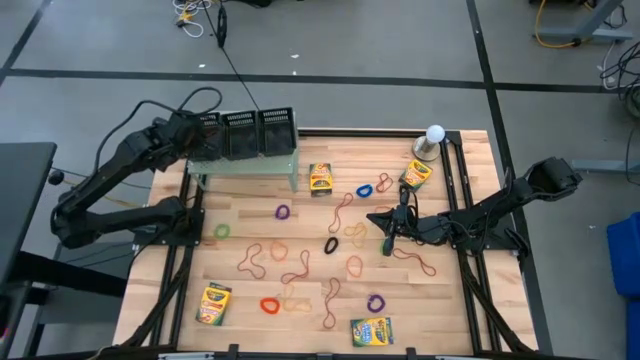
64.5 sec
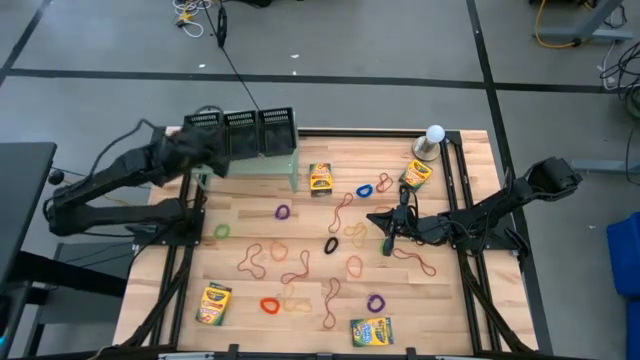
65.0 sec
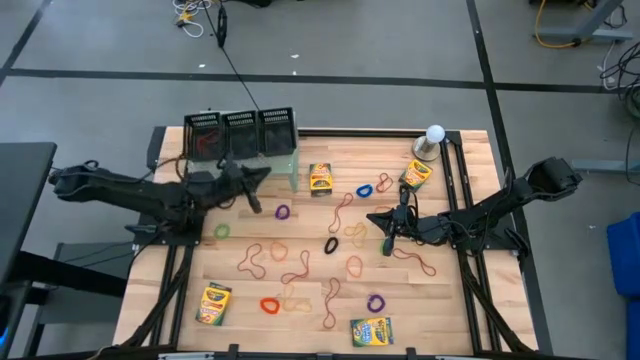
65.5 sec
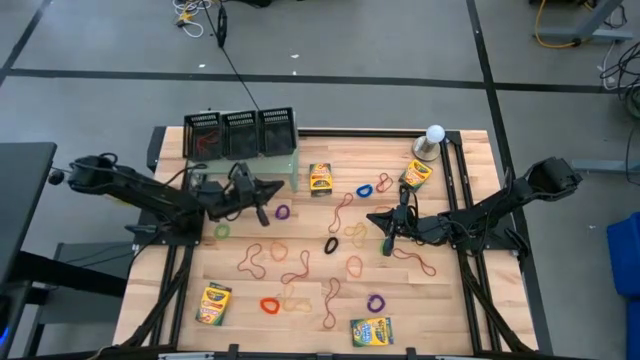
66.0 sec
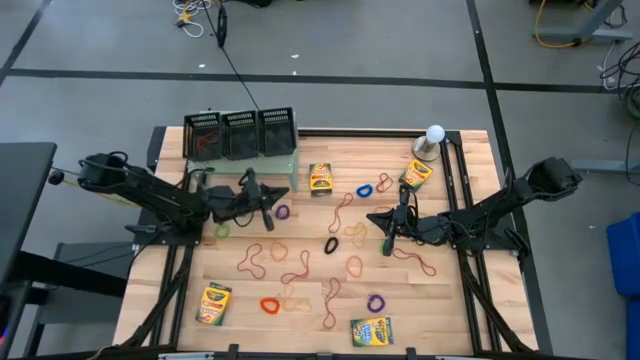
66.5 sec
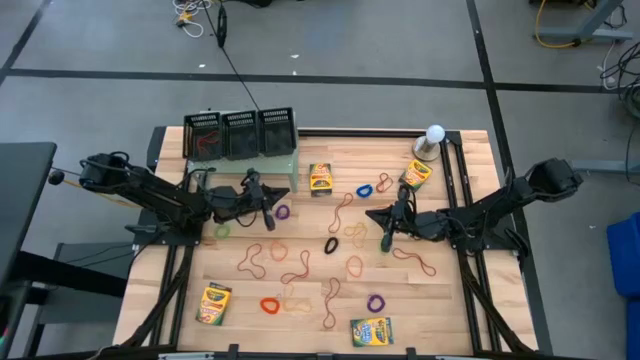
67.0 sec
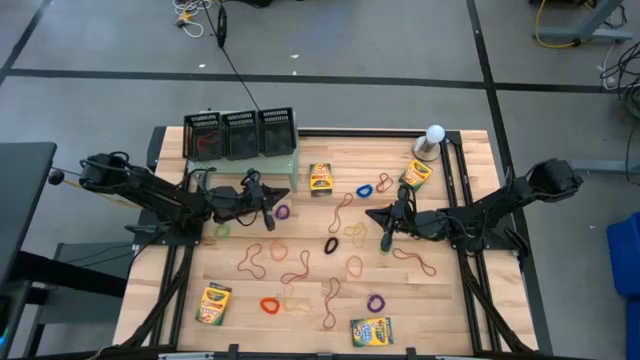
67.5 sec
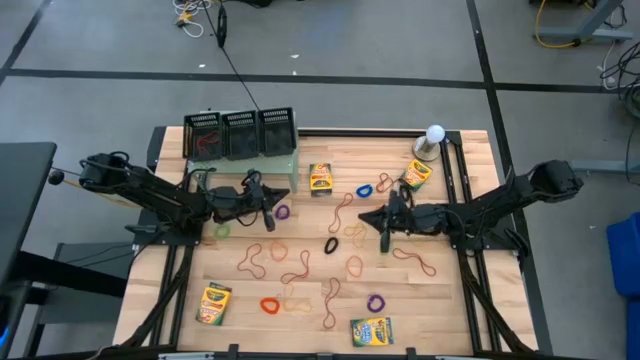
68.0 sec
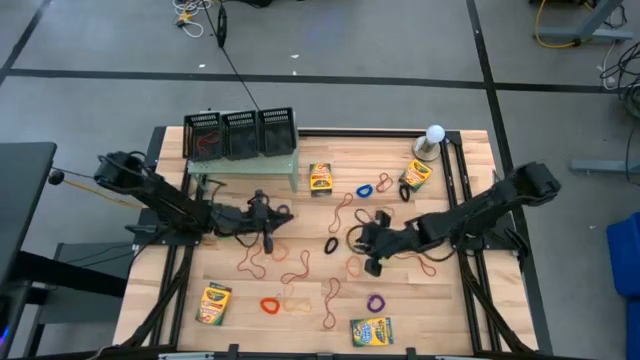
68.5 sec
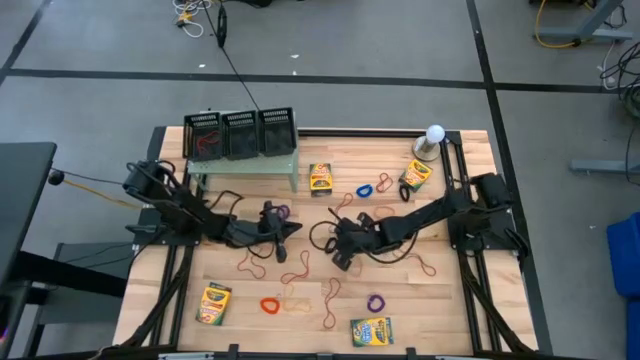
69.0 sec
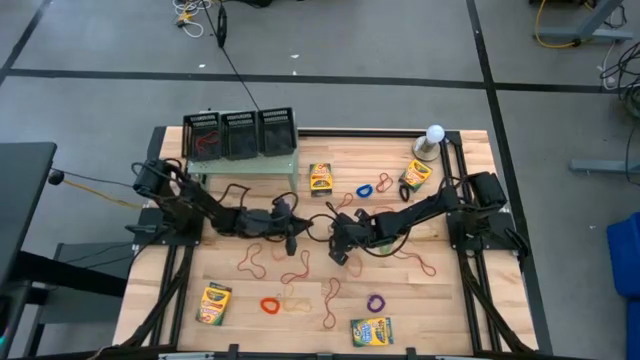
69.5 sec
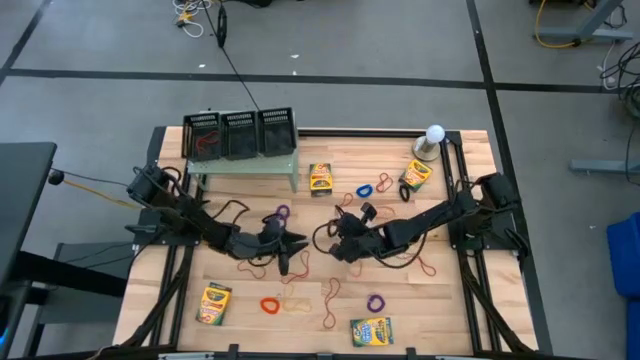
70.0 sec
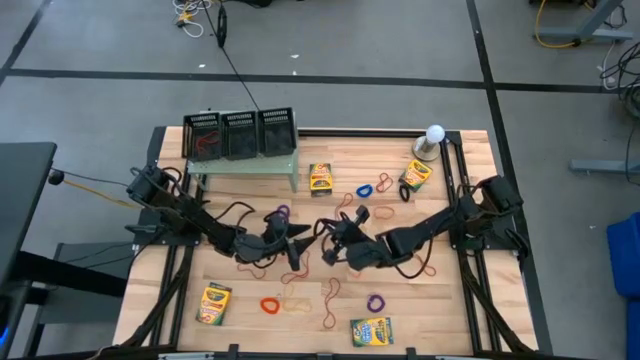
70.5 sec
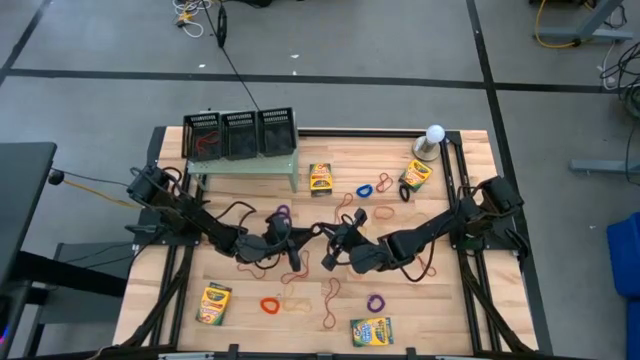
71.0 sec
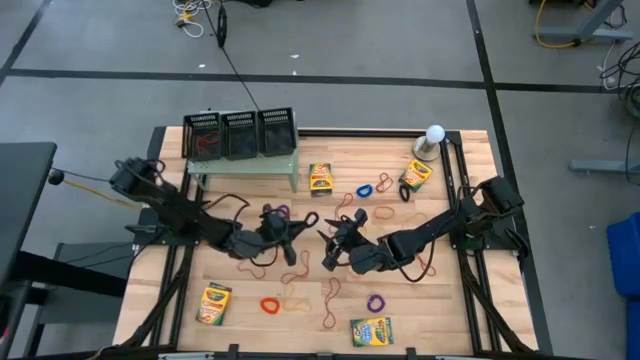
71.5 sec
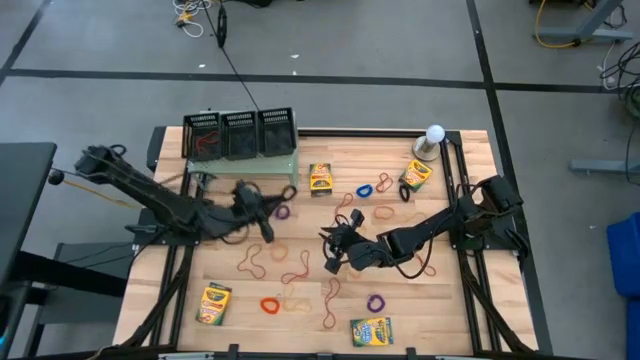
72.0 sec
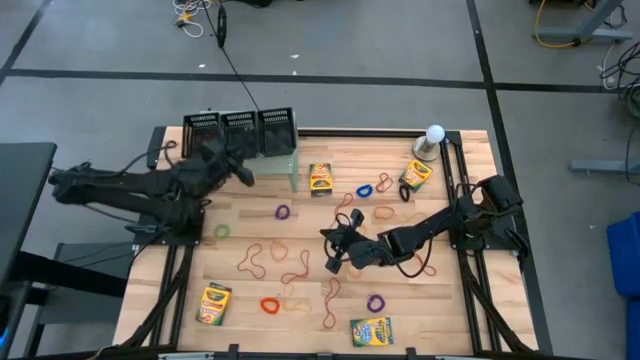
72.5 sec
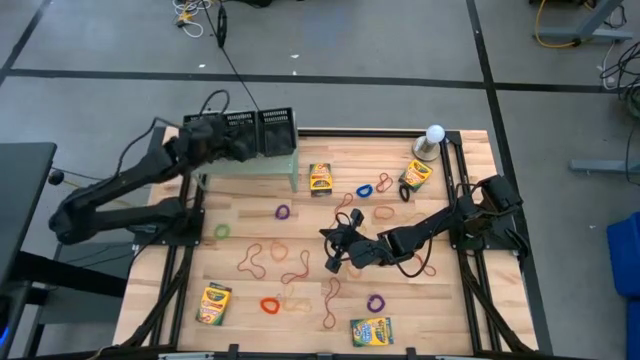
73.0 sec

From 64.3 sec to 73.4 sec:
Task: Pick & Place Office Desk Supplies
Put the black spring keychain into the middle black bin on the shelf

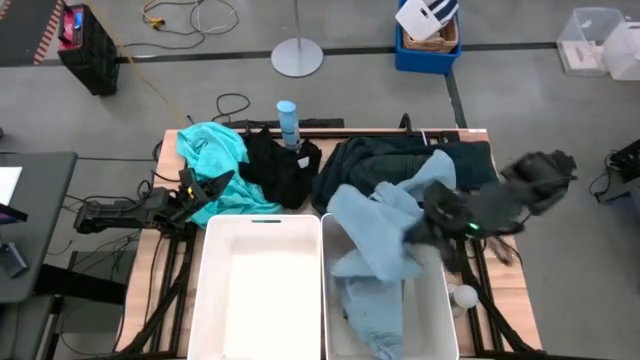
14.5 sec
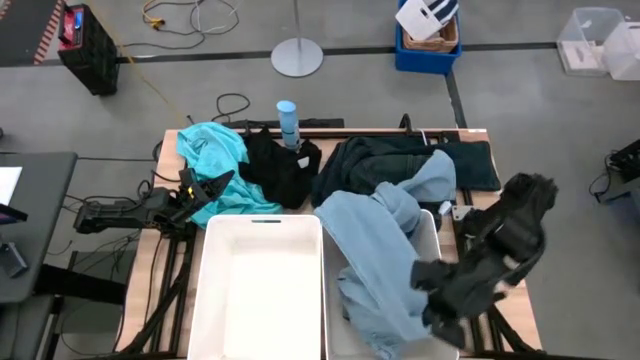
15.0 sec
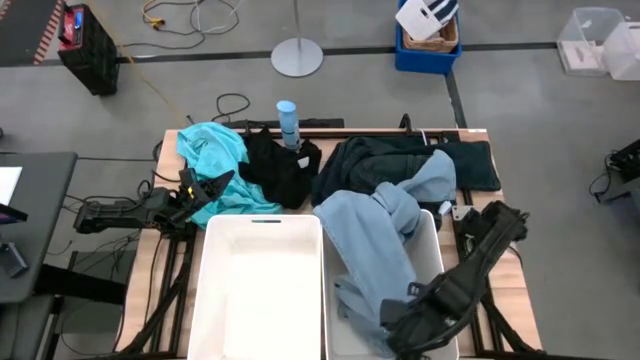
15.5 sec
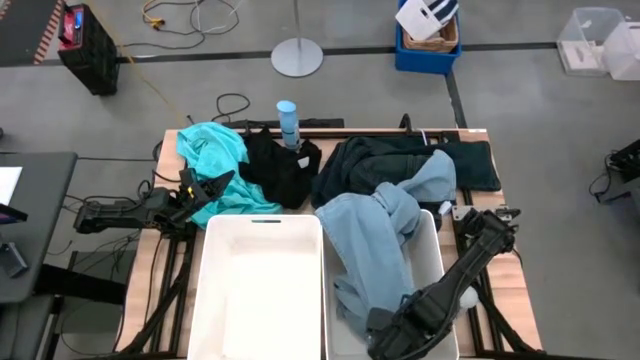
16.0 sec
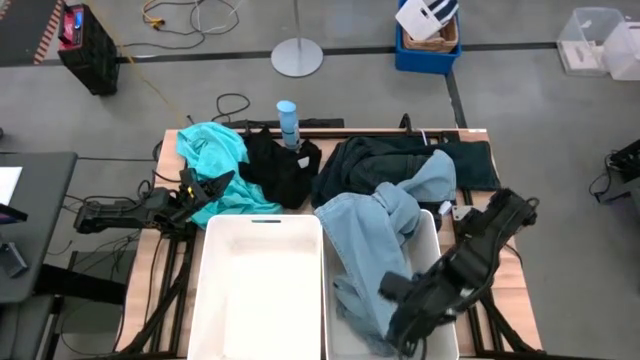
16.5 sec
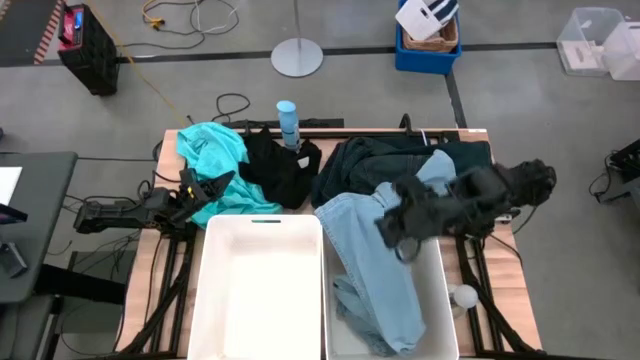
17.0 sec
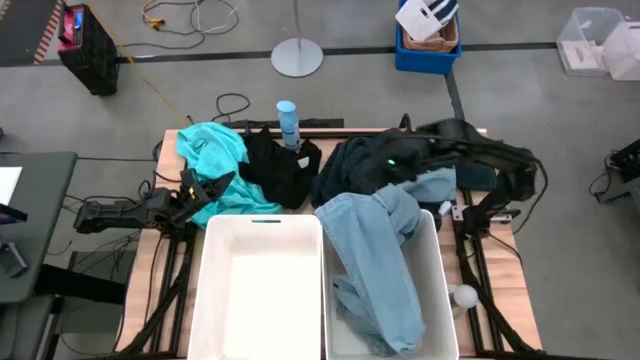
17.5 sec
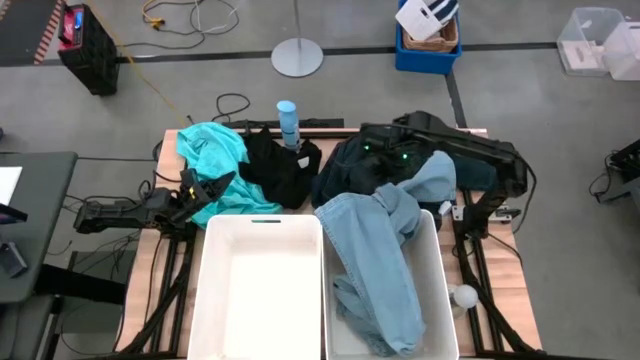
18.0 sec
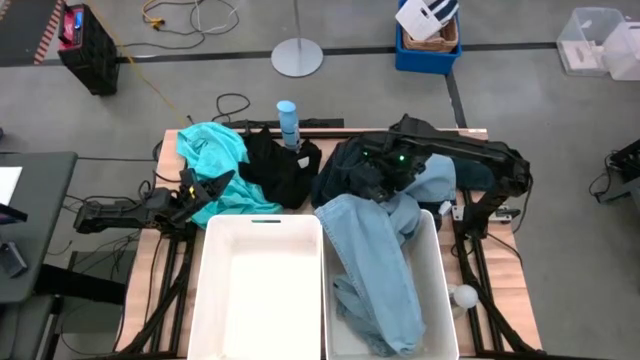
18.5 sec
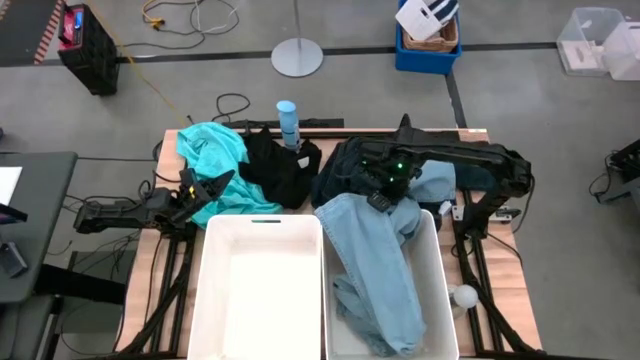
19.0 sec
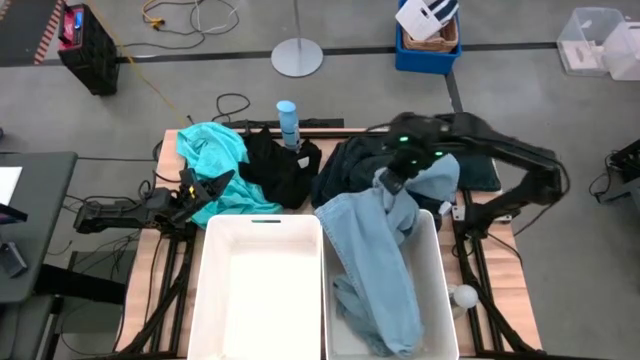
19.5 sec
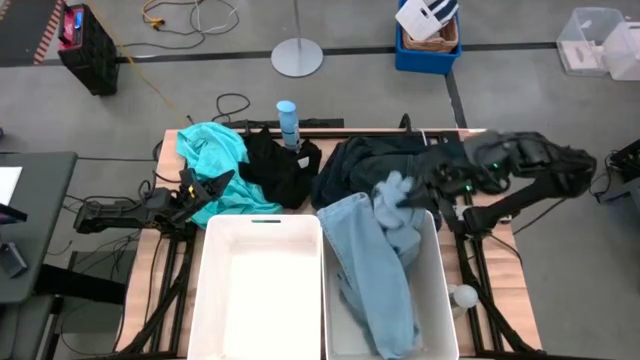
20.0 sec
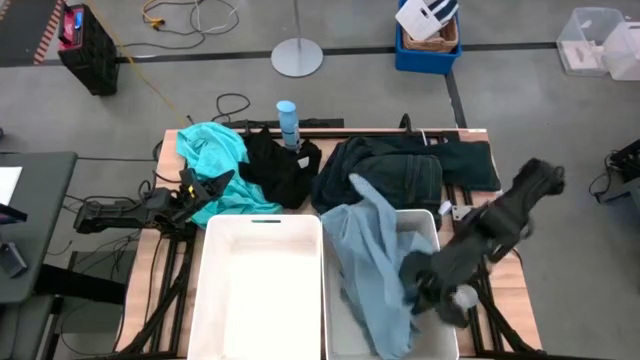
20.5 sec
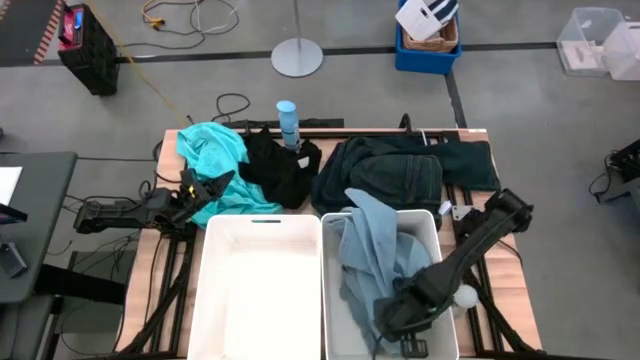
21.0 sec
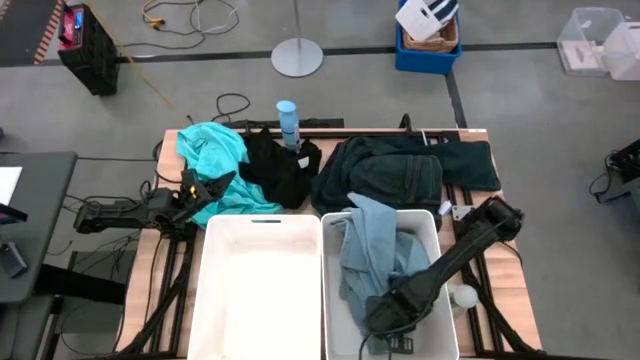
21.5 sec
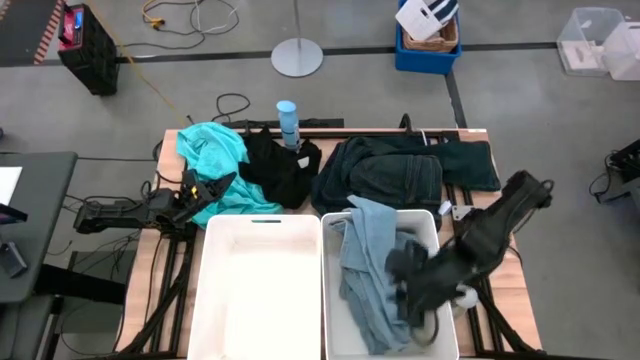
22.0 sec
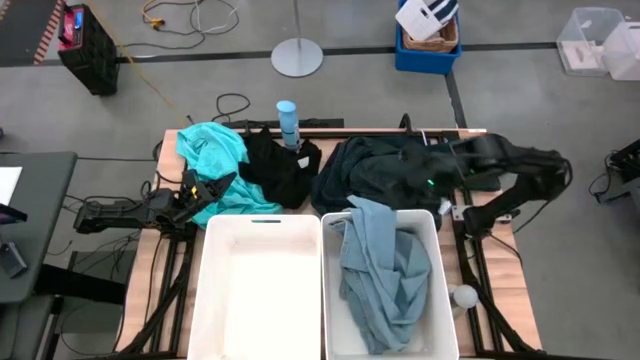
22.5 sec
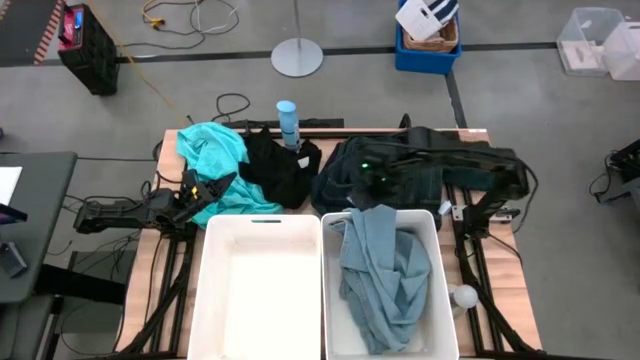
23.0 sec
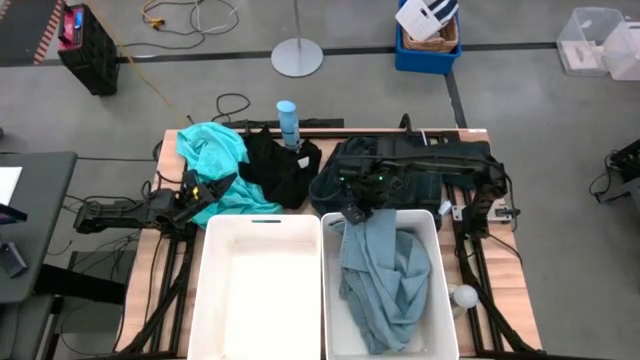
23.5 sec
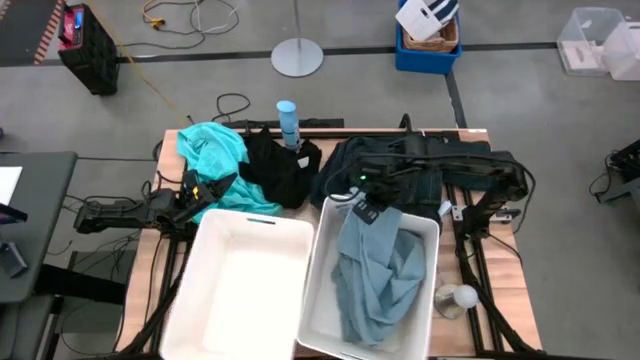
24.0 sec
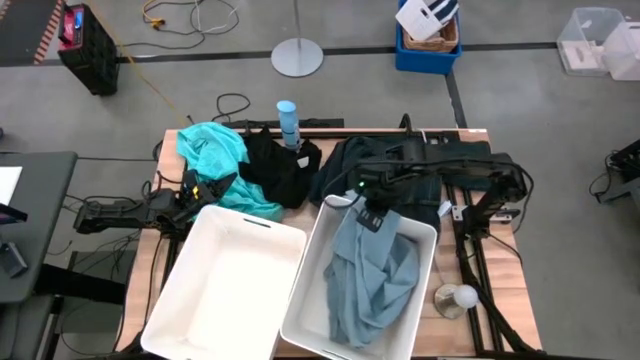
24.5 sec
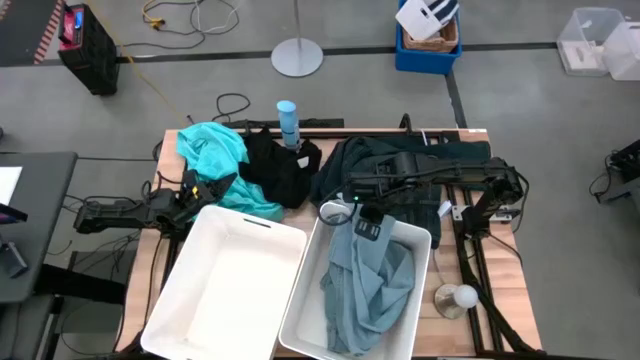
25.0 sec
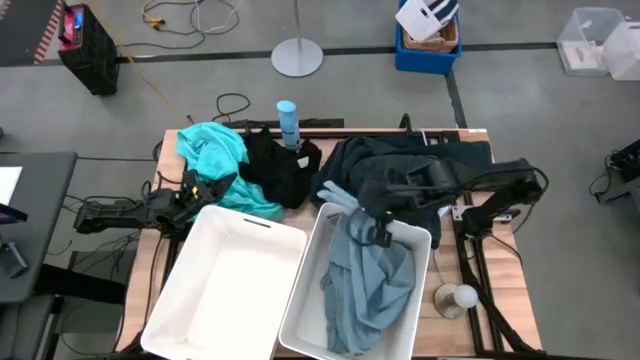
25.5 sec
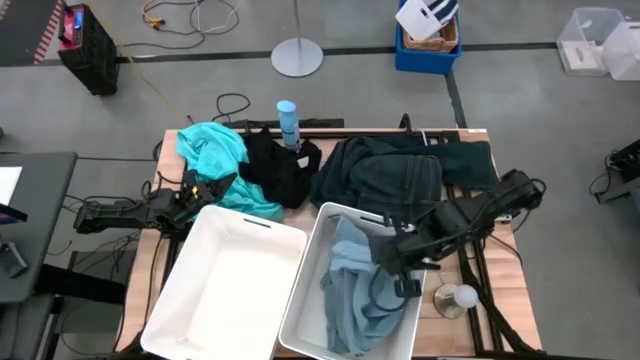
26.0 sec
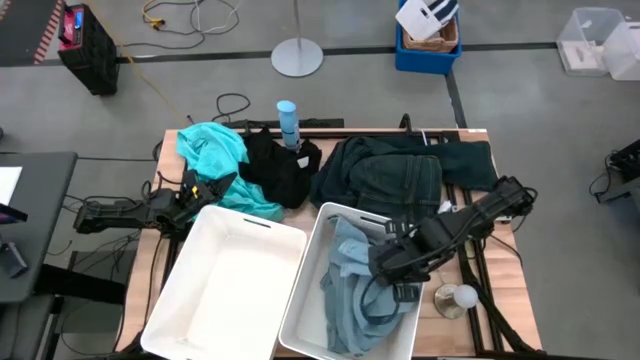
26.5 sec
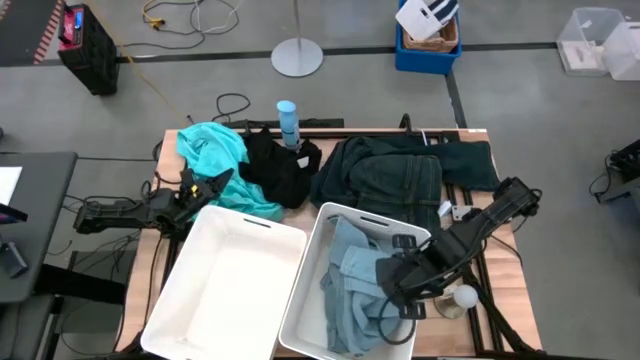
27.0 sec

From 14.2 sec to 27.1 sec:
Task: Sort clothes
Put the light blue pants into the right white bin
